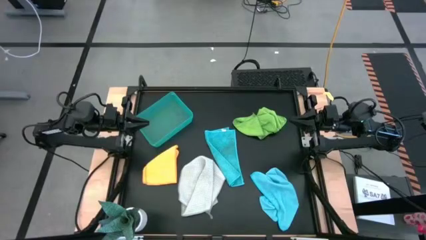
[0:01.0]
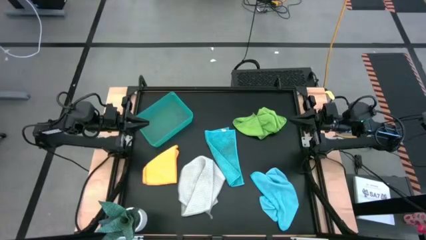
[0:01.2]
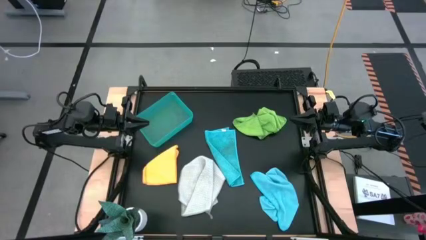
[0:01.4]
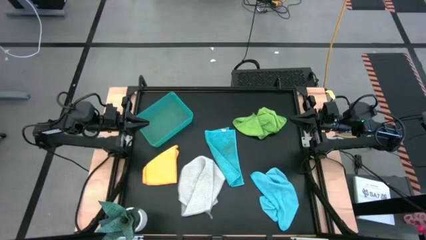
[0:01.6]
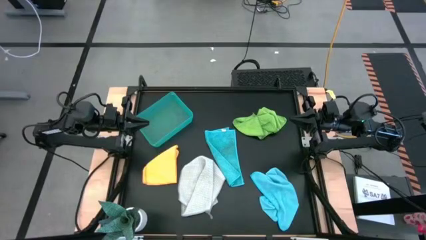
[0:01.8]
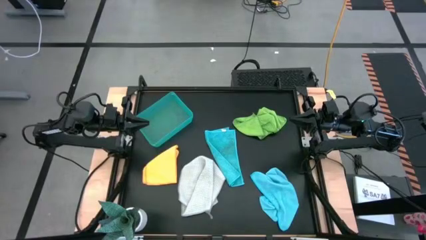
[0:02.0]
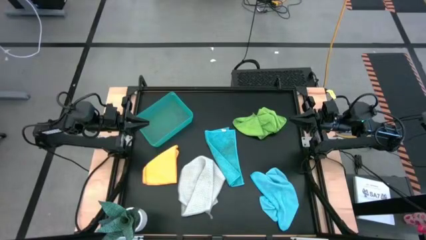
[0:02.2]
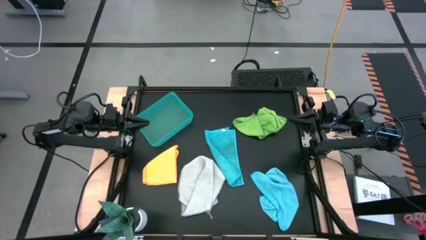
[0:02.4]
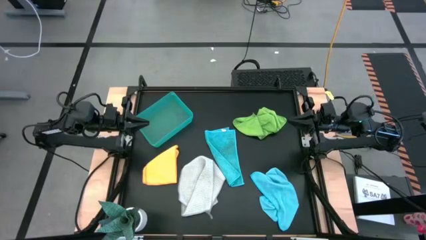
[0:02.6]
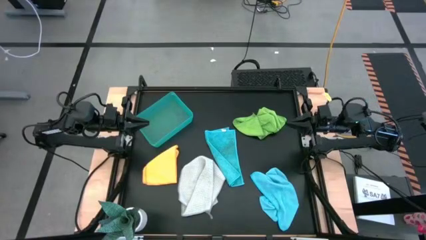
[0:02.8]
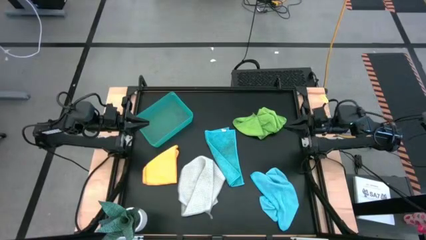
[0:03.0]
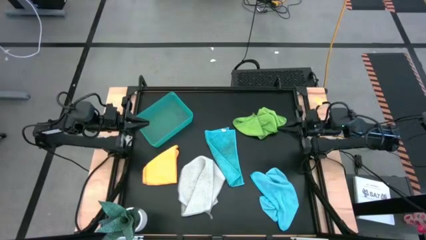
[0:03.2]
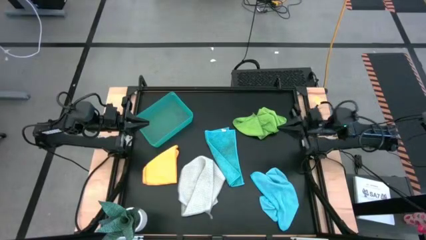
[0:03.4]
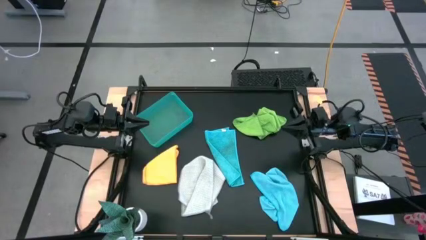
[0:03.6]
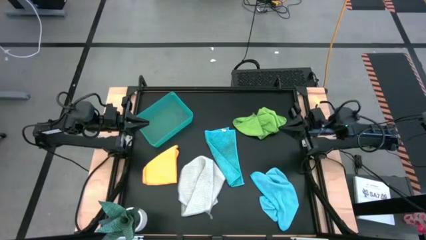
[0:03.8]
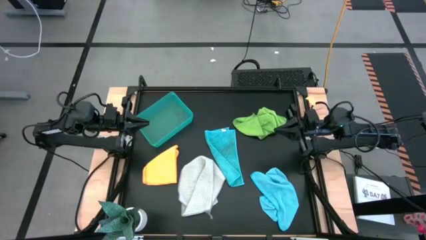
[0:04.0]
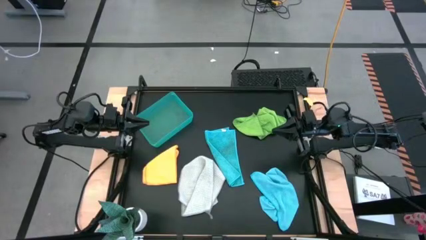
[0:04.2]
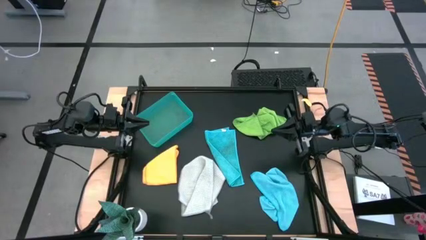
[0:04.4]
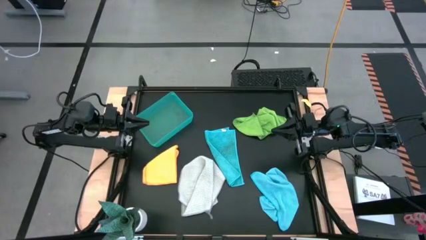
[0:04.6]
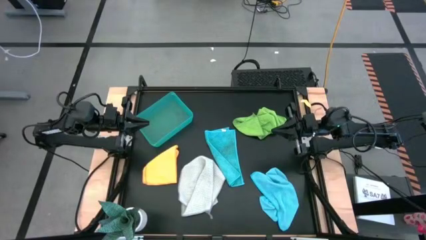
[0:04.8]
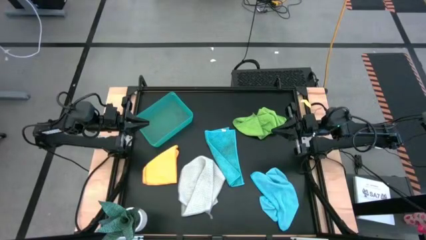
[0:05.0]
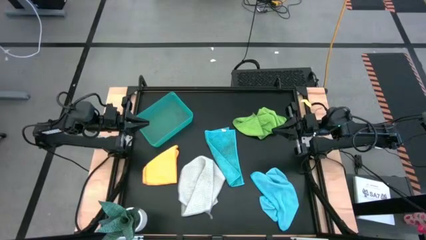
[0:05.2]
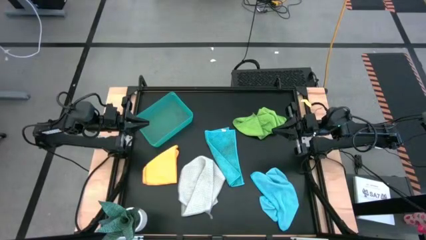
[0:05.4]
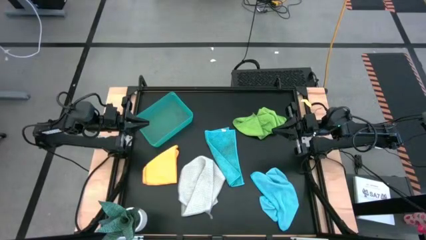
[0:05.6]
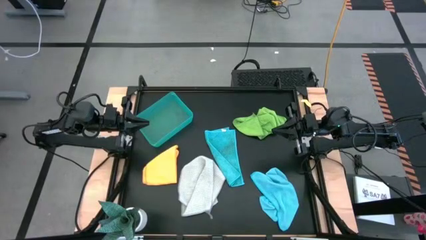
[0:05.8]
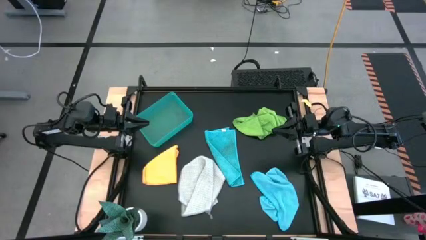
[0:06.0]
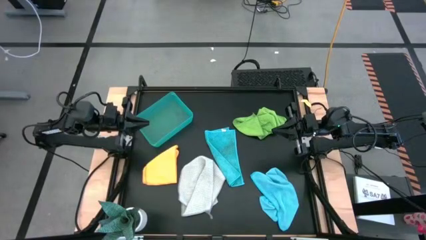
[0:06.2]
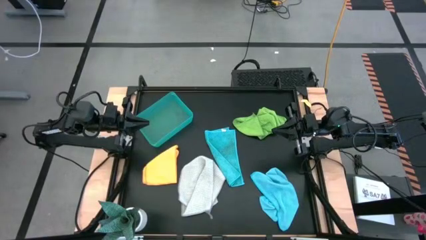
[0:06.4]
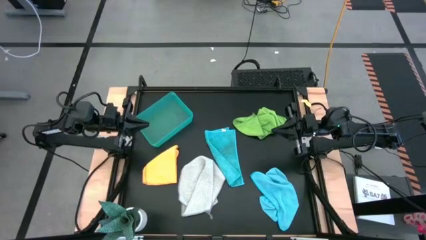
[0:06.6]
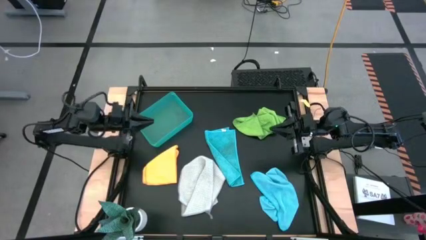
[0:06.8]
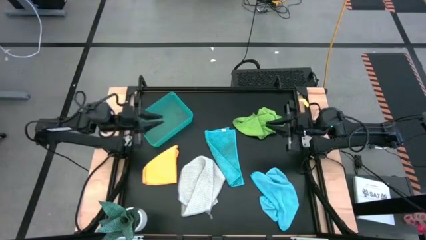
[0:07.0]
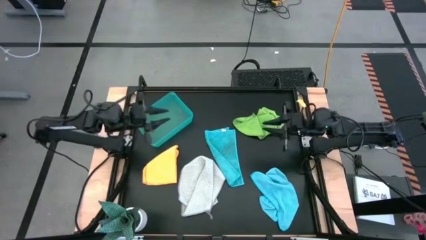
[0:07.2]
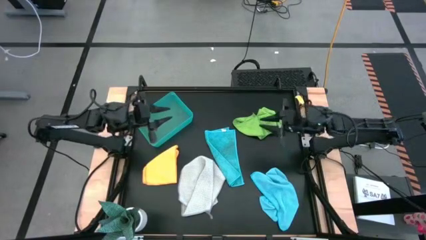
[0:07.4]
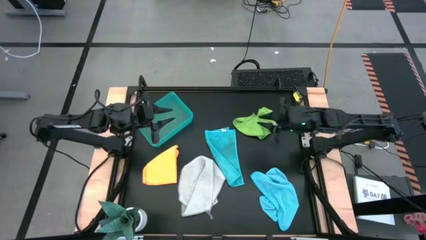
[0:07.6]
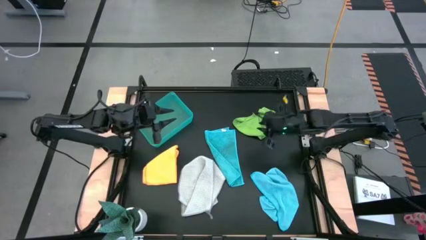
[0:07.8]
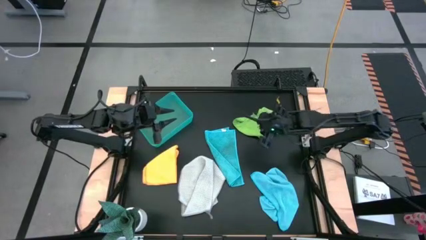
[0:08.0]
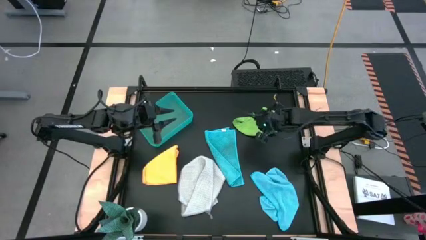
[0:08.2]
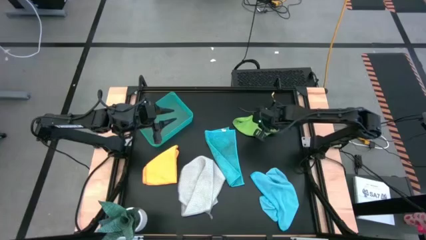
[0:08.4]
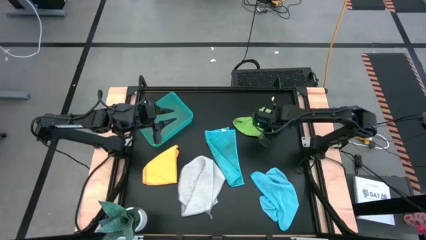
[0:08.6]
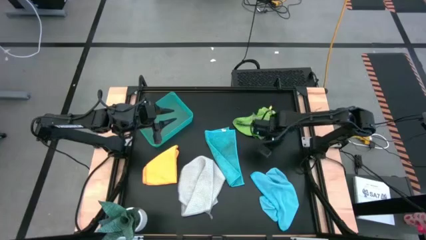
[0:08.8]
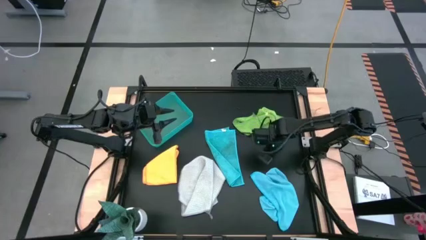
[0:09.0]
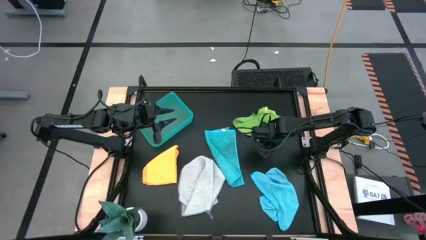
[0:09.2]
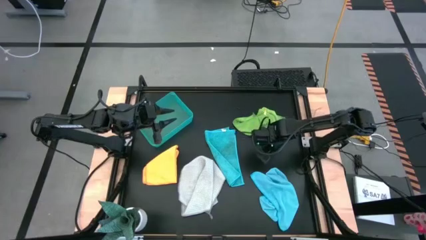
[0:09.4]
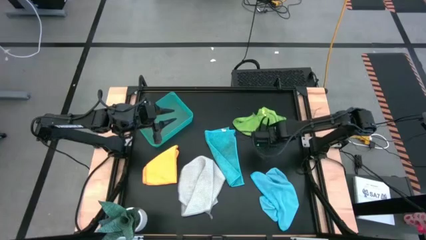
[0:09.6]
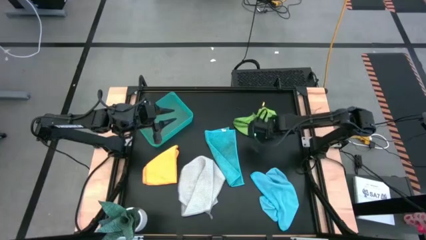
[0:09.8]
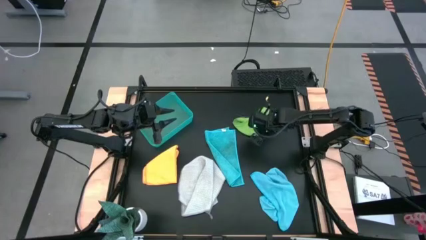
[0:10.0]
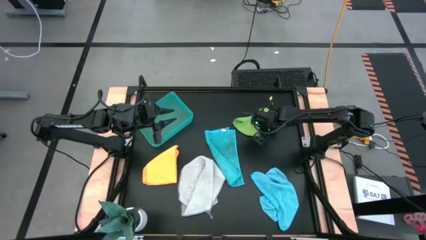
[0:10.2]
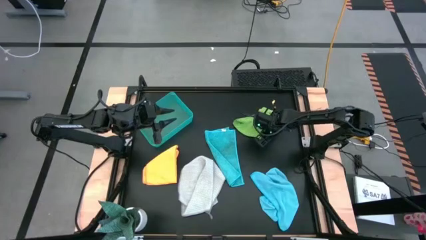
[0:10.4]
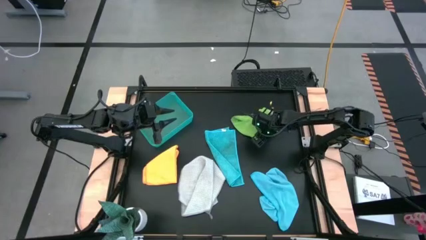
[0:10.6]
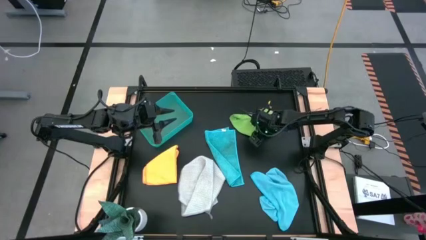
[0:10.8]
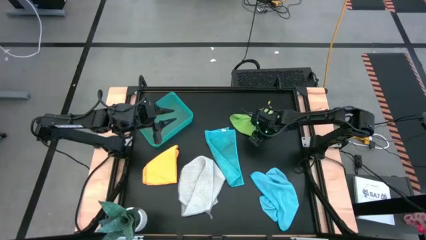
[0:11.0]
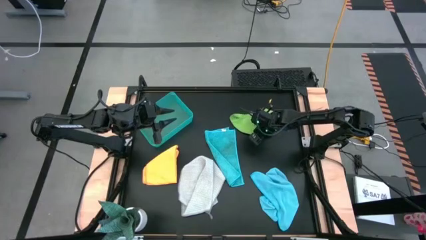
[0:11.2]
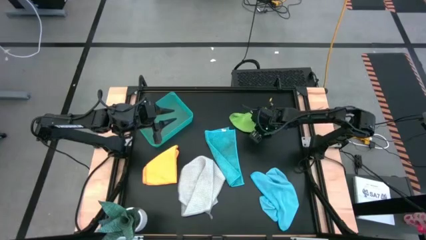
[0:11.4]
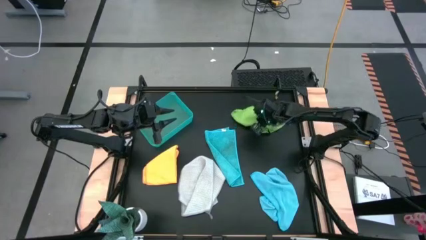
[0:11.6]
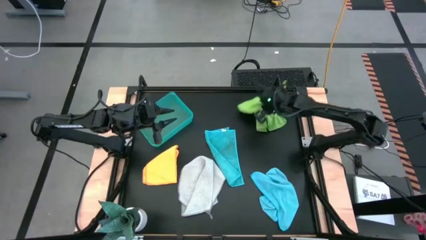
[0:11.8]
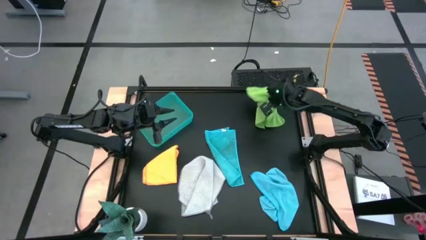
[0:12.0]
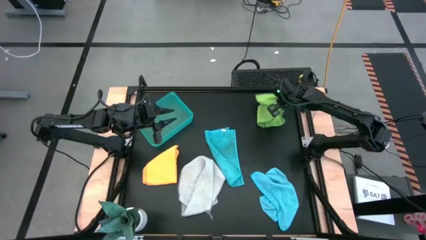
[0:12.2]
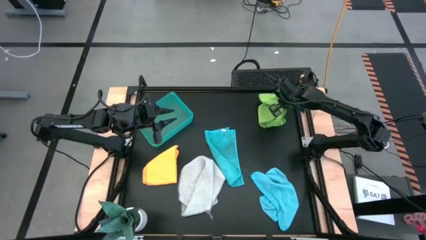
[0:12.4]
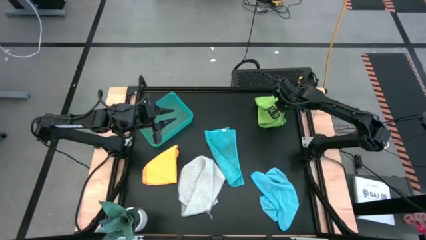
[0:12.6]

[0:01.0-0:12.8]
Task: Fold microfiber towels
Adjust the green towel on the table

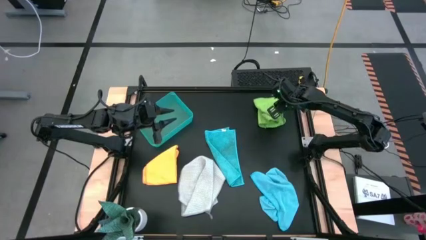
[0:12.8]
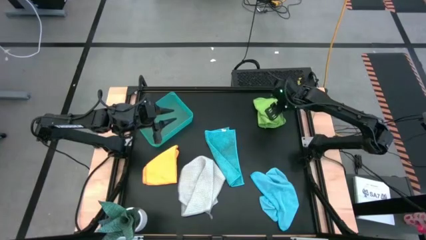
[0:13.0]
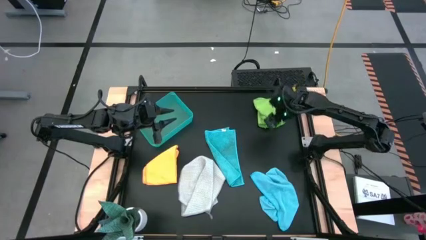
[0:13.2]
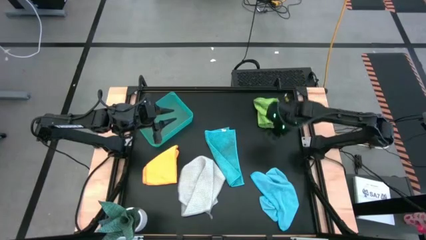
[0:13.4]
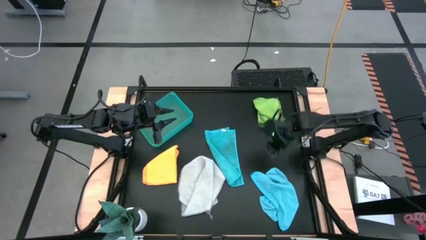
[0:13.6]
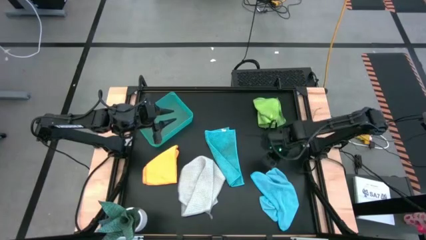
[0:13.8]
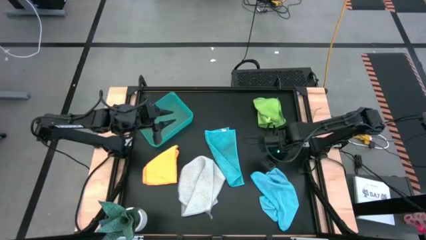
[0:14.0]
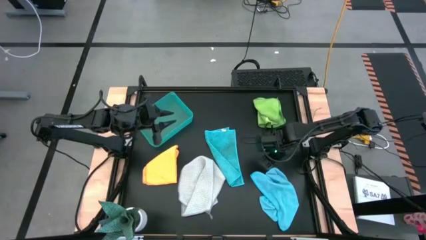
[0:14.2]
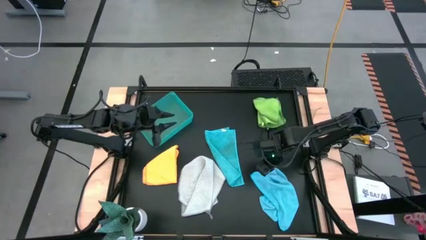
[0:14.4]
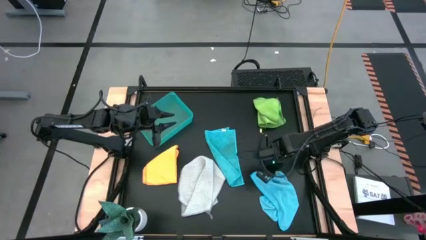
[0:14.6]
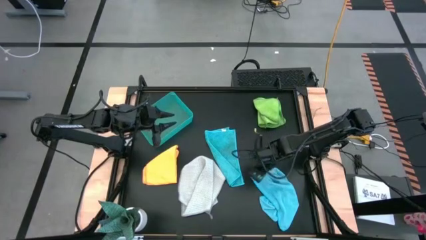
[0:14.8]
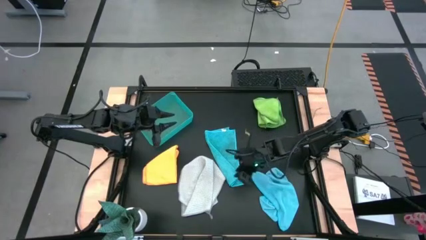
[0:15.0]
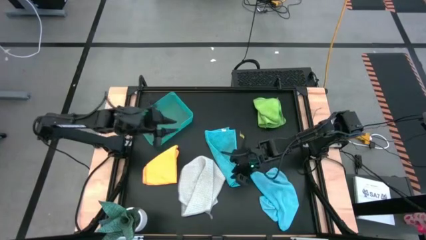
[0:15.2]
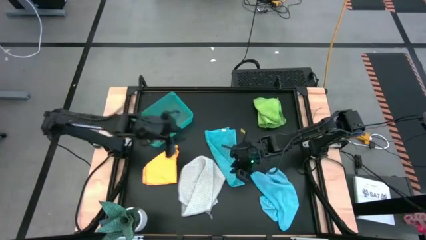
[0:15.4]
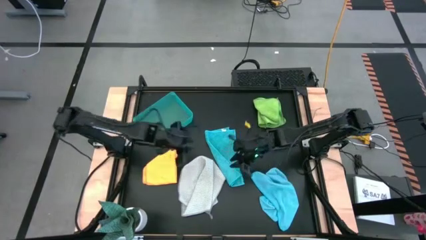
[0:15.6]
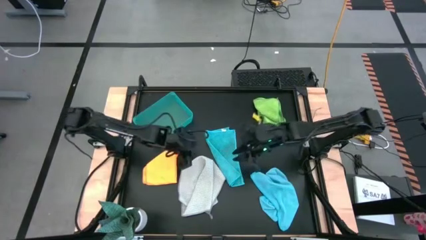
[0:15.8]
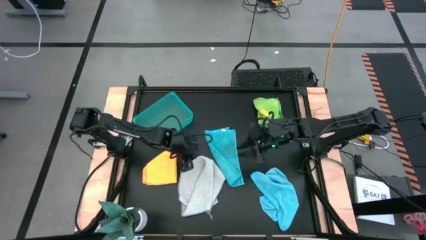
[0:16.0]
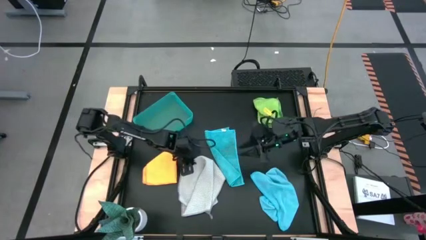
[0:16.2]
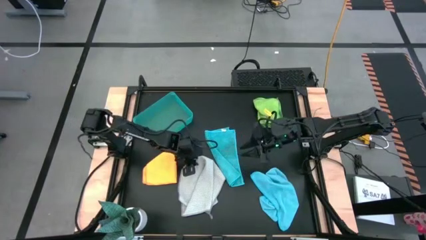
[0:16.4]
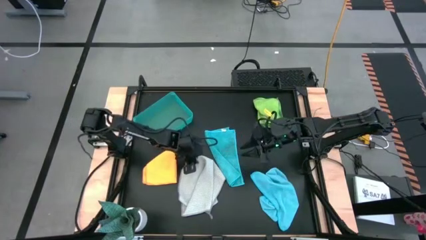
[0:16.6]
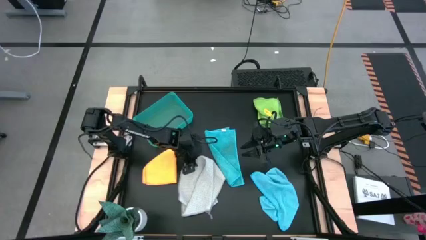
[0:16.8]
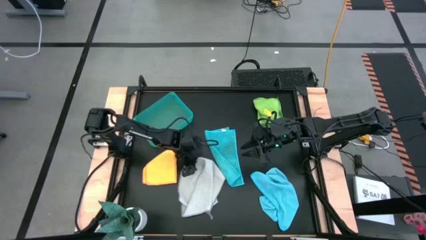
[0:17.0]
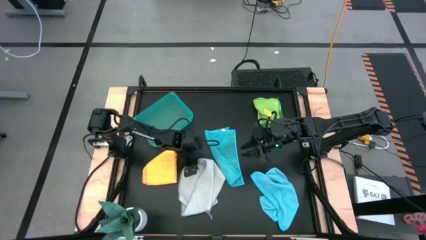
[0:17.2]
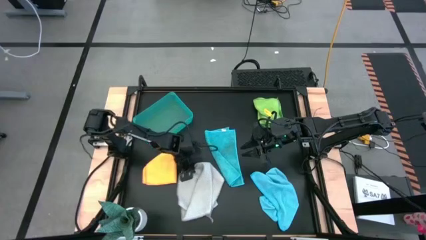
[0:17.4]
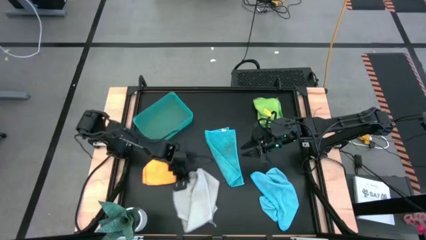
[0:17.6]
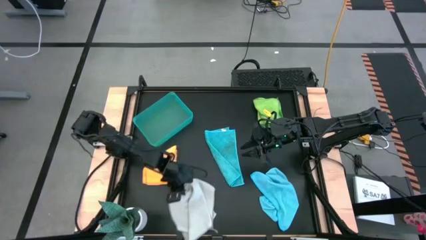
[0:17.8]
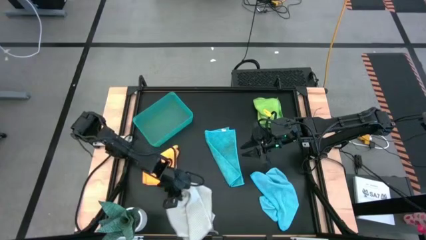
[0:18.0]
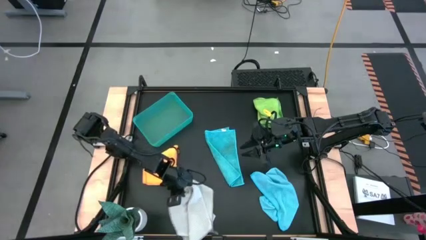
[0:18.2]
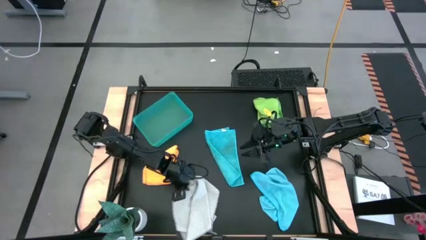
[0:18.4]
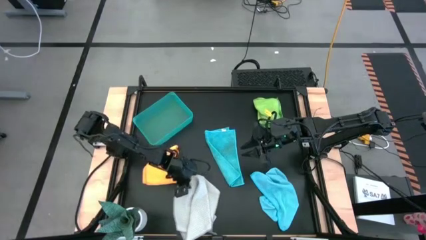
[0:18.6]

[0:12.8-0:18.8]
Adjust the gray towel on the table
